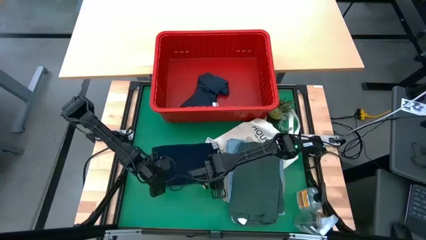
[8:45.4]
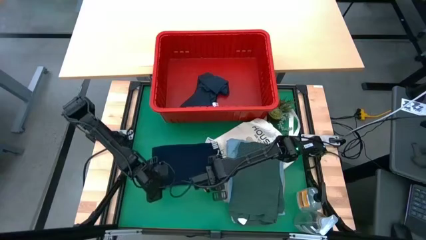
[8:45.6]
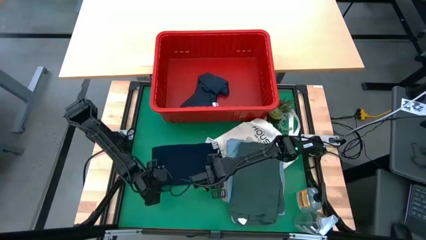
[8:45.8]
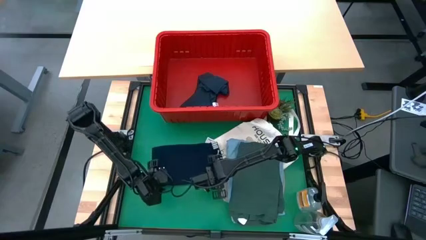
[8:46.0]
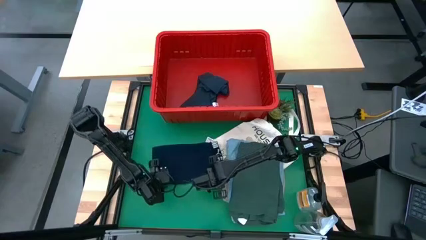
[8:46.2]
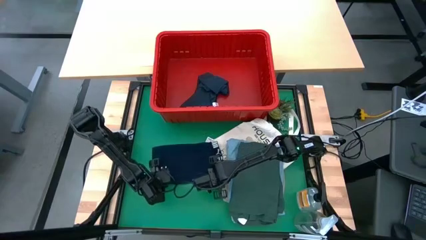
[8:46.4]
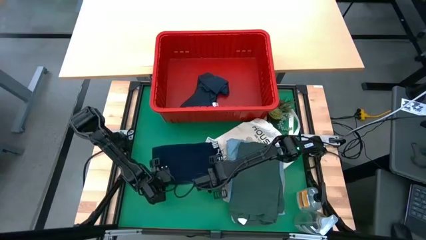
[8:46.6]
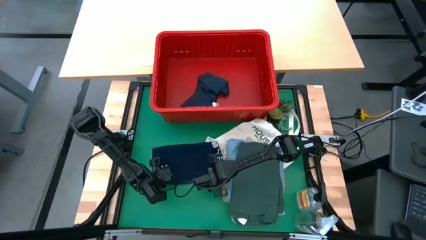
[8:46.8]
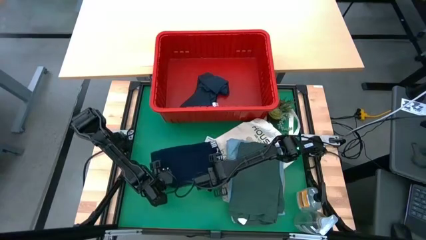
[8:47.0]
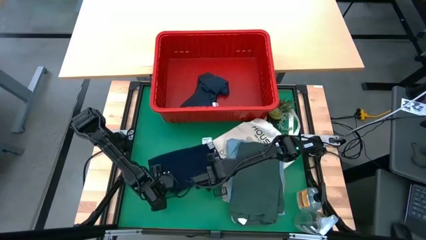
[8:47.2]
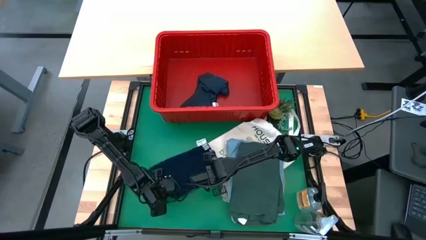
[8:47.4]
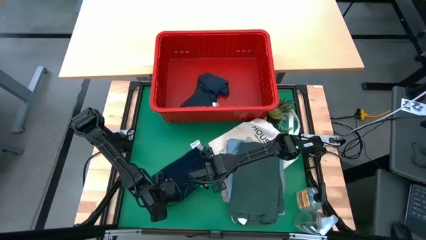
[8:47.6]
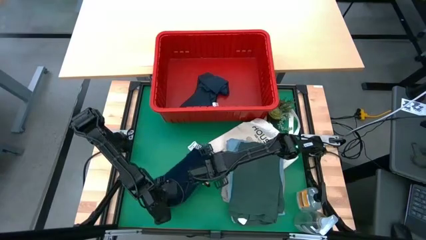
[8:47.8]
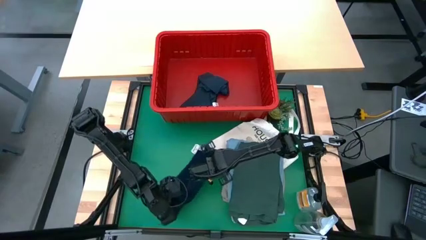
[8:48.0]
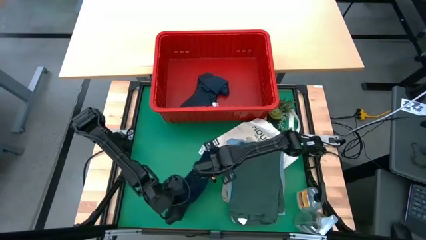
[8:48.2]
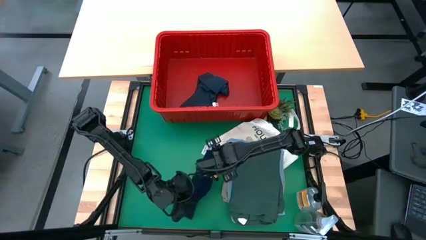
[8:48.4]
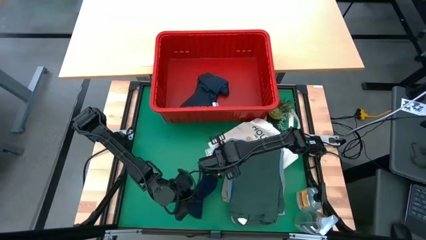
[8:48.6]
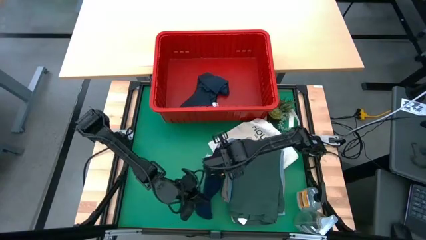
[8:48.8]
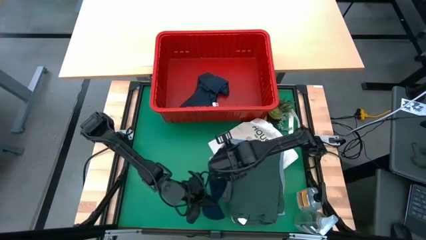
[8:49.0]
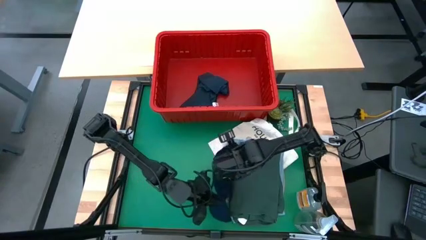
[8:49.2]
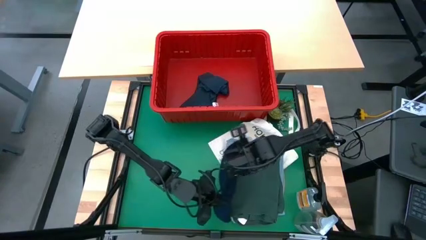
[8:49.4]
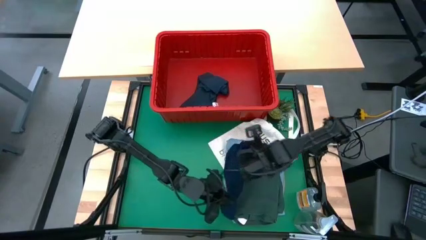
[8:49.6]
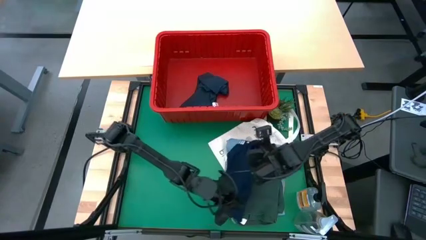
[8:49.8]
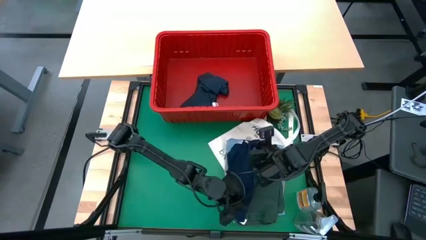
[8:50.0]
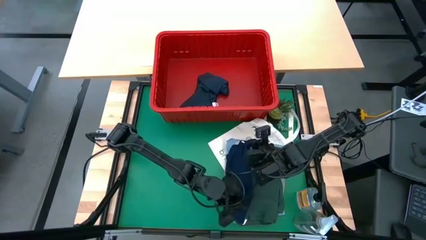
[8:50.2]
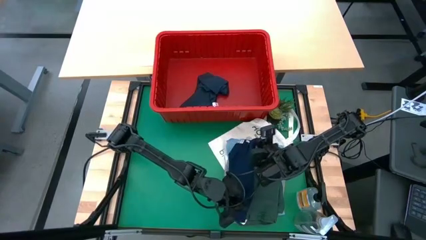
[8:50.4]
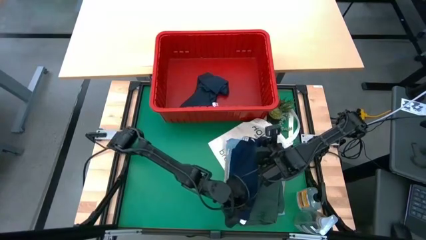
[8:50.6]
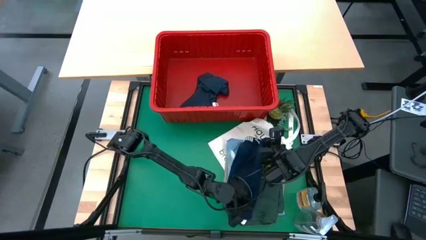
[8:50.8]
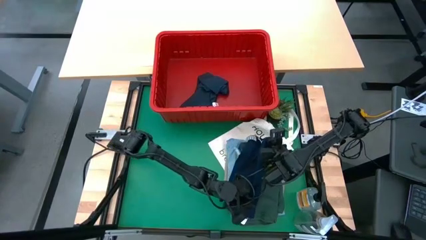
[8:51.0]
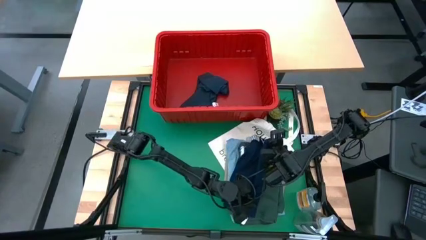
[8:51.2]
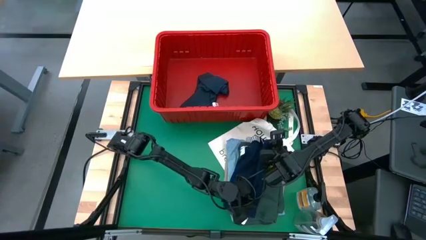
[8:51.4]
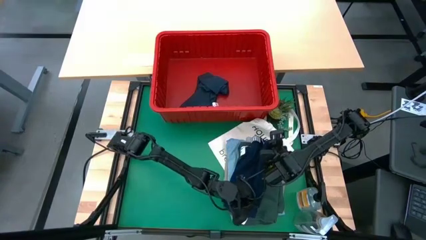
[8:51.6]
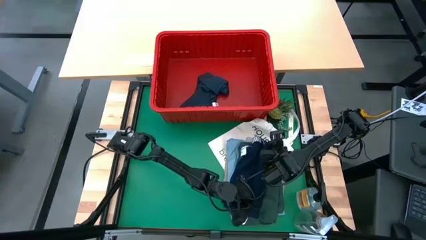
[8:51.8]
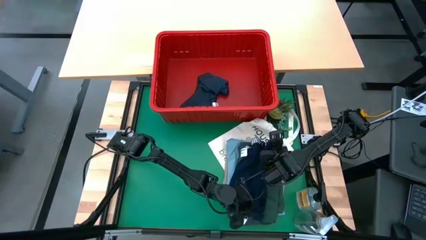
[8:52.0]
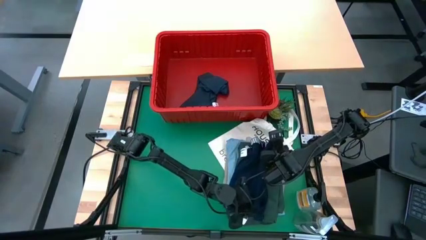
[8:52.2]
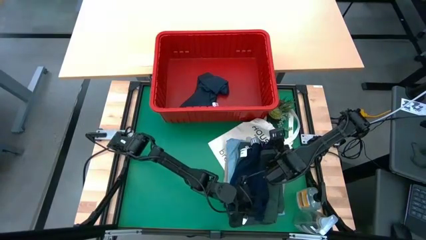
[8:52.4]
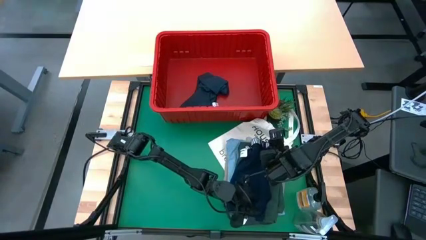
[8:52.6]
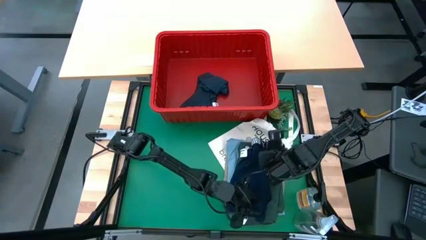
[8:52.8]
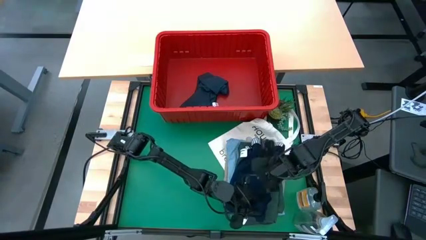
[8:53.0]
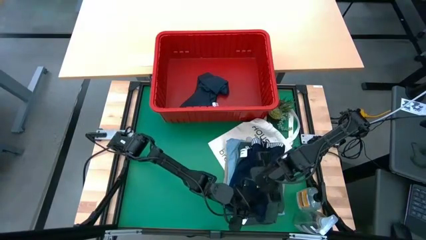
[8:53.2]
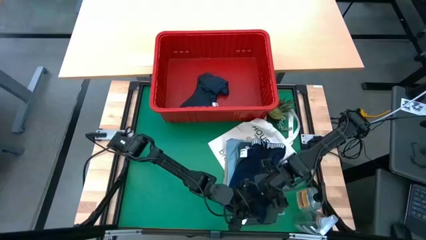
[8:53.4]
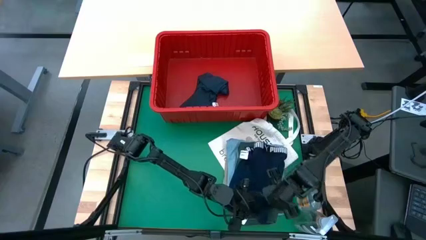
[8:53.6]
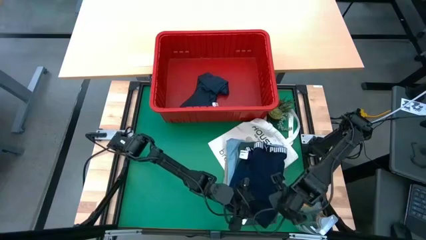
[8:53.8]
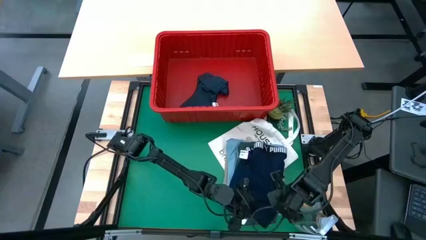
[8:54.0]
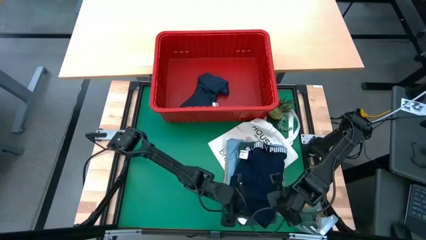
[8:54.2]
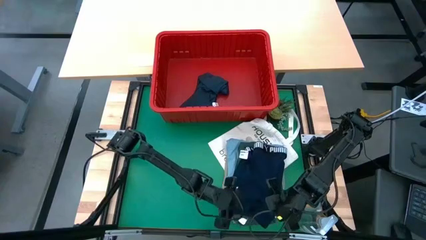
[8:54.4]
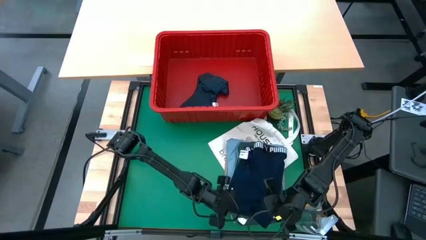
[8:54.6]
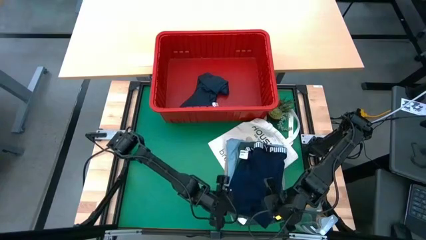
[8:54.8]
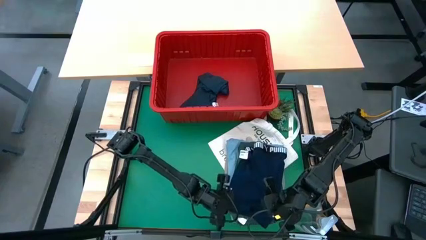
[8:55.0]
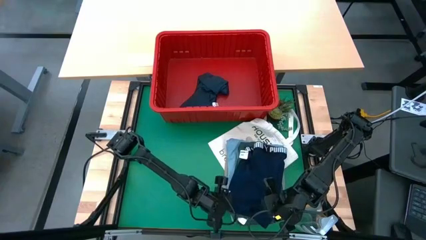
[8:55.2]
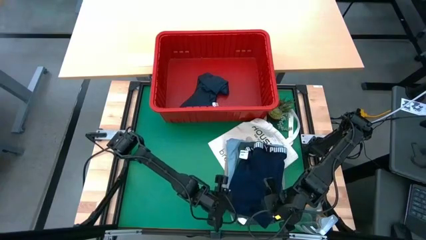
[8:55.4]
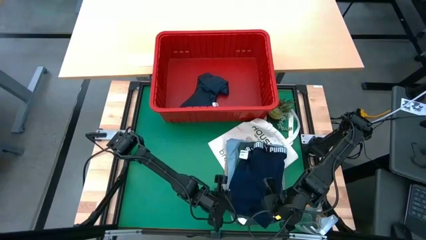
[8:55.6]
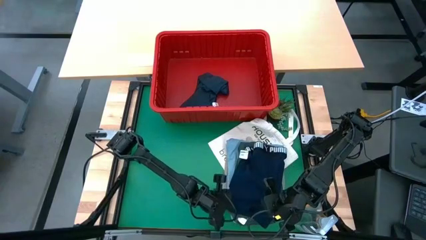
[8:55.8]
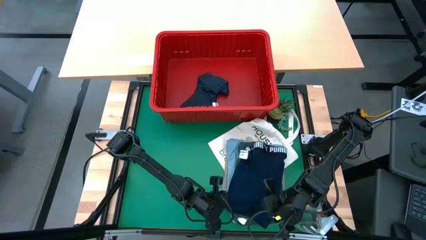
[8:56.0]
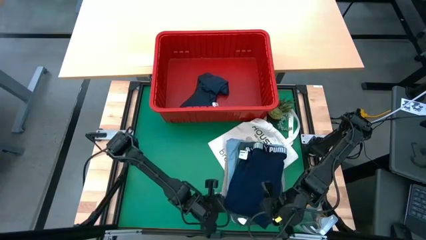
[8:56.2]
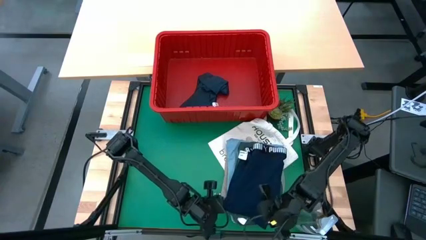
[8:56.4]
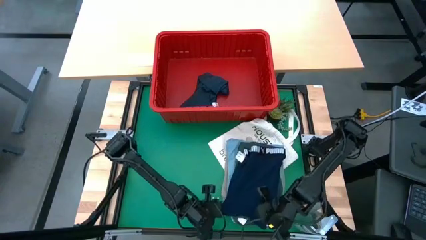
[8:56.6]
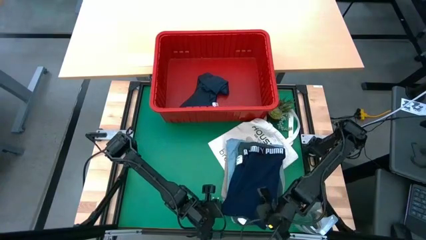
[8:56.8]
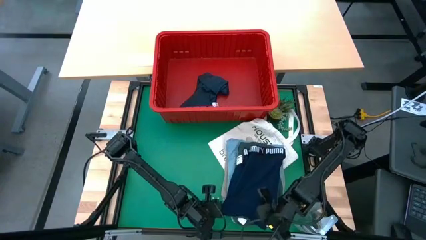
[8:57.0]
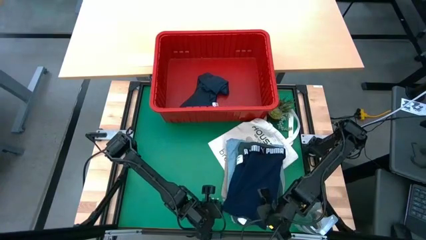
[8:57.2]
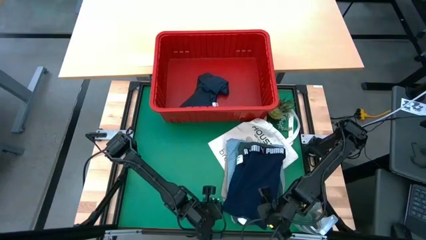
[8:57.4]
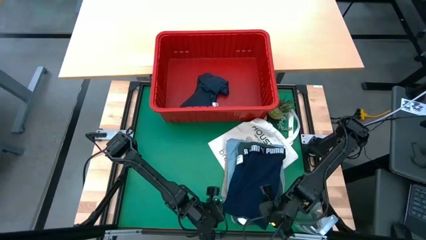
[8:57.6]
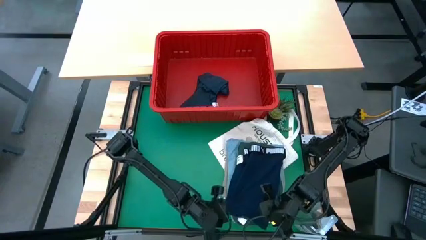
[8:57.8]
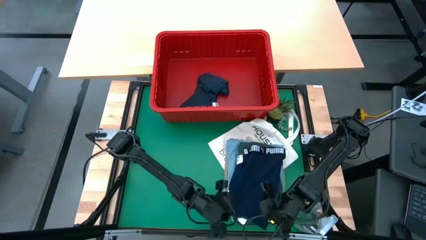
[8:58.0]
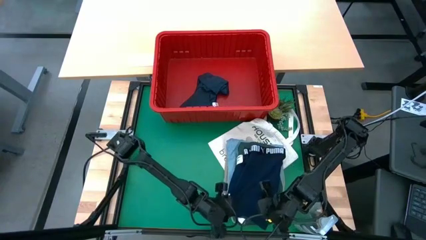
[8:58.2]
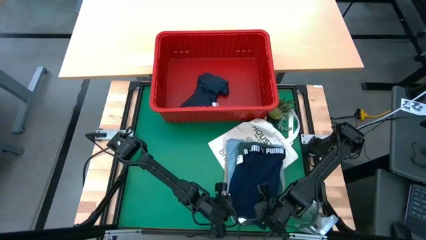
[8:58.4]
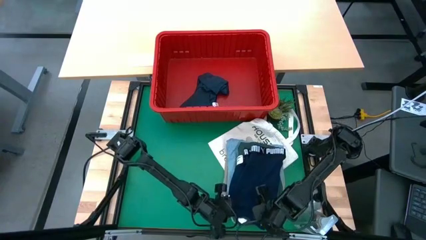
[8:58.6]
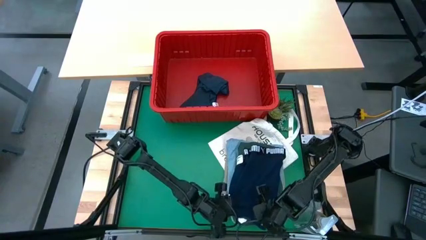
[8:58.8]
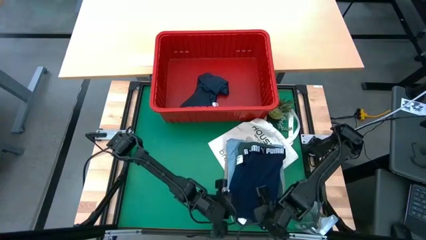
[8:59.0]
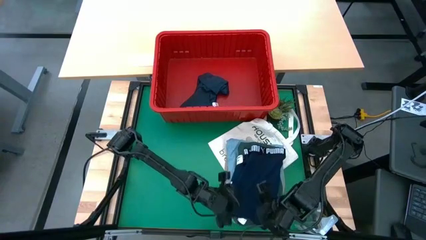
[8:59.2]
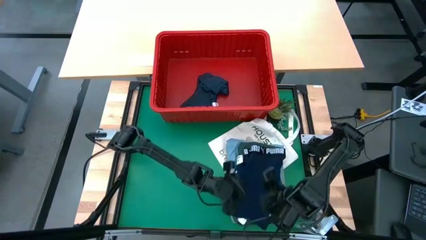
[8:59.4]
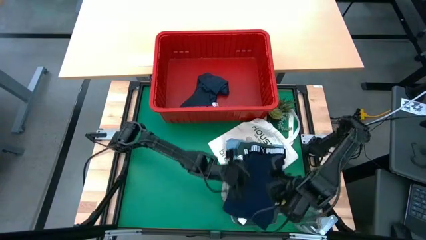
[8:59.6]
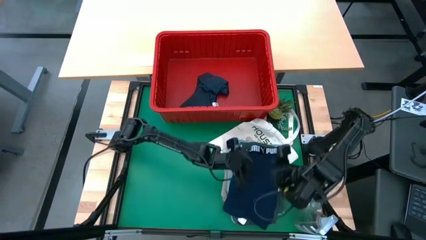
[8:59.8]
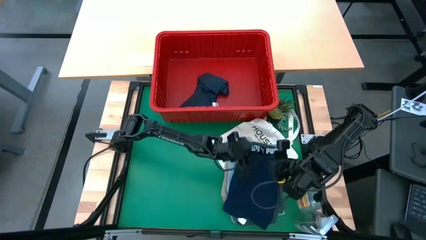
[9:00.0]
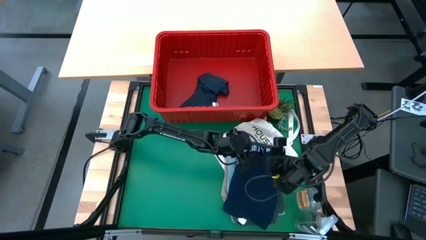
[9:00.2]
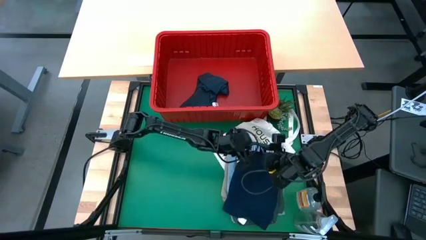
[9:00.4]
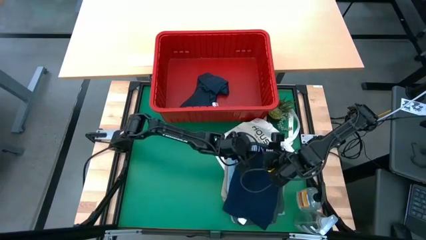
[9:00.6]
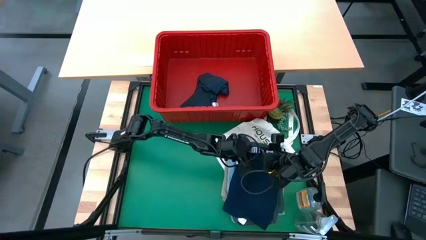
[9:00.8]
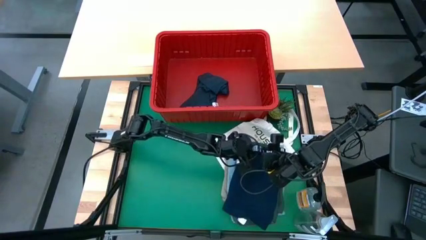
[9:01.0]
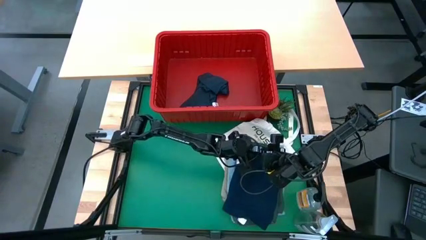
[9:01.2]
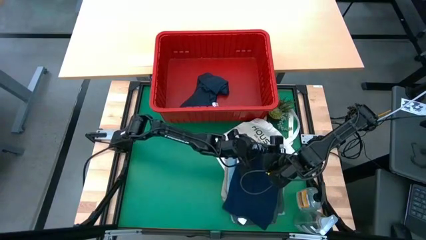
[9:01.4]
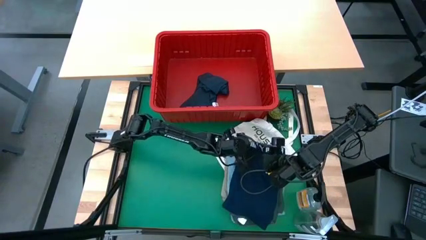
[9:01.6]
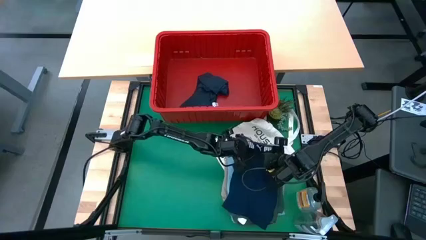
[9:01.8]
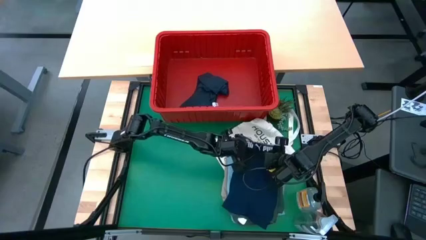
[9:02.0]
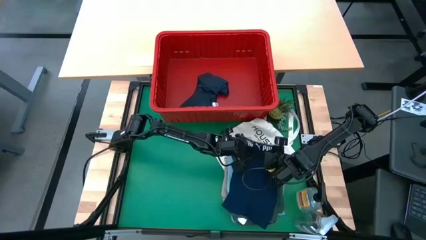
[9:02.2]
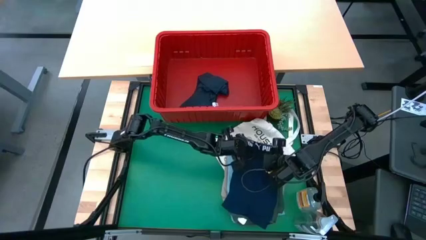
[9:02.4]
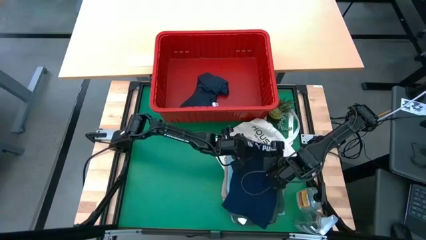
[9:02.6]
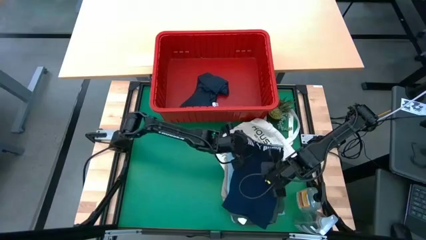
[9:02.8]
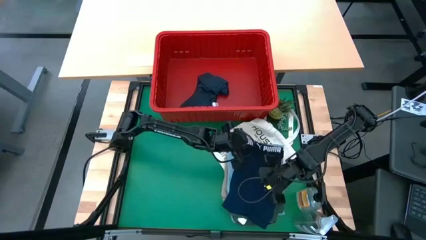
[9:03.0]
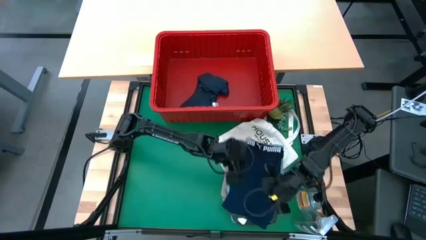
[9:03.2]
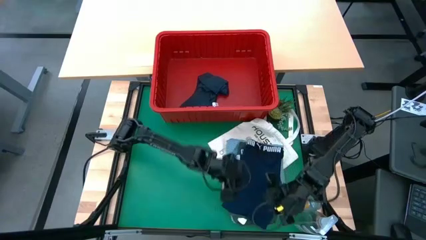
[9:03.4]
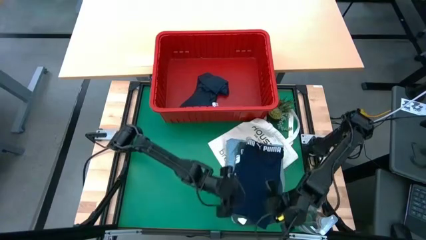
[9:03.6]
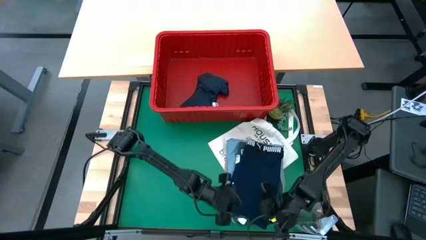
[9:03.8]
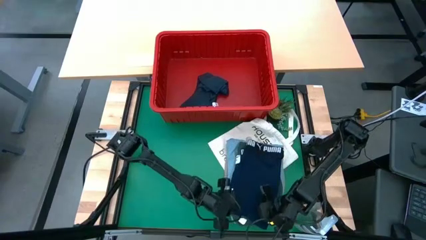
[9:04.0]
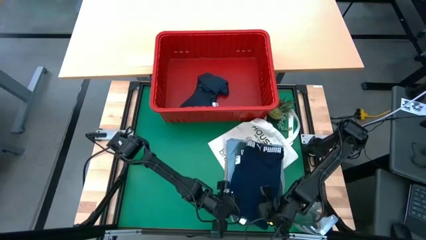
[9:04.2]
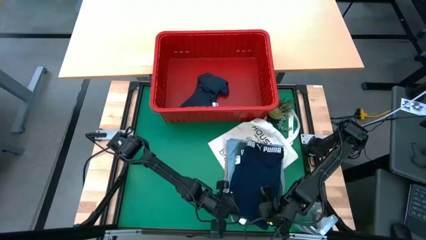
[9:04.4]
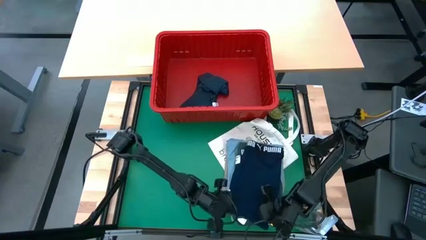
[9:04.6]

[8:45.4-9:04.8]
Task: Fold Laundry from Bin
Stack the dark blue boxer on top of the green polo shirt
